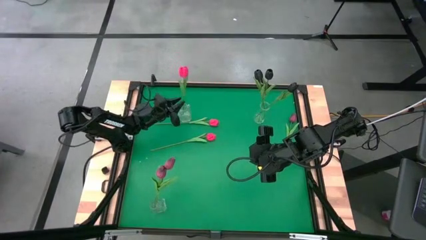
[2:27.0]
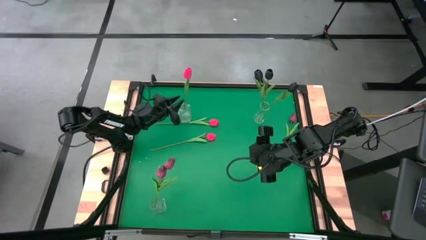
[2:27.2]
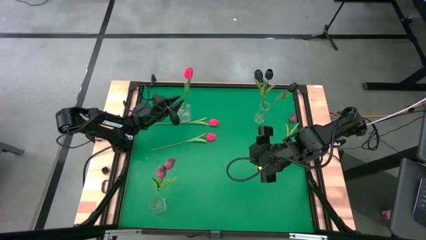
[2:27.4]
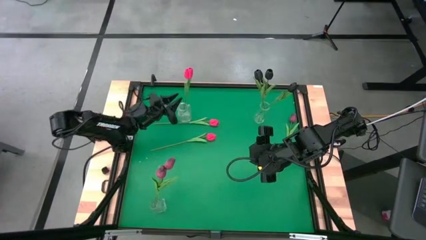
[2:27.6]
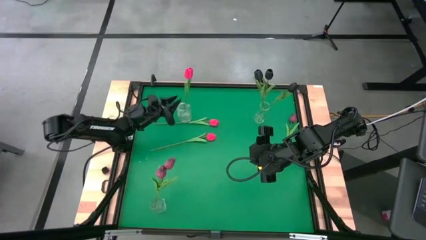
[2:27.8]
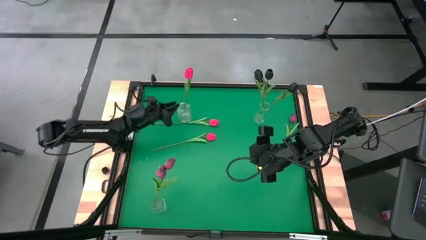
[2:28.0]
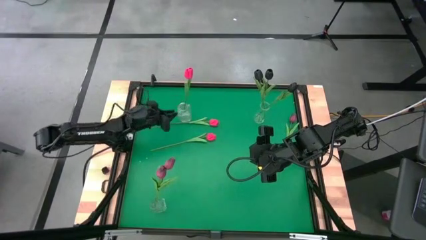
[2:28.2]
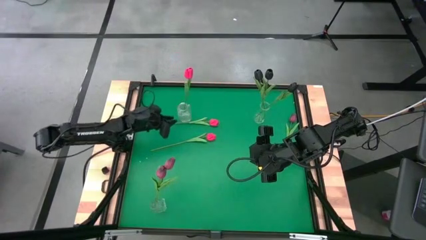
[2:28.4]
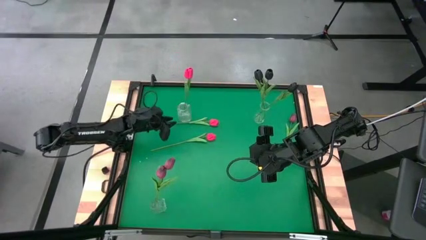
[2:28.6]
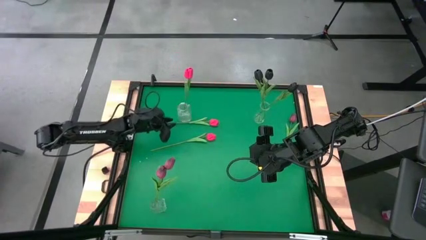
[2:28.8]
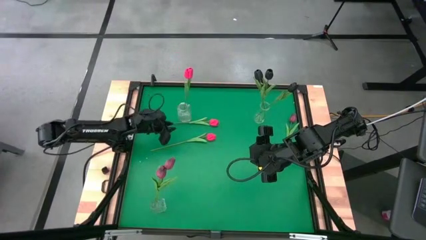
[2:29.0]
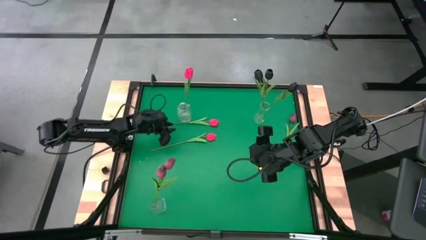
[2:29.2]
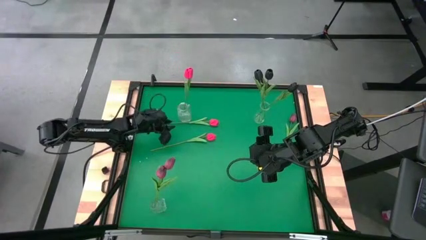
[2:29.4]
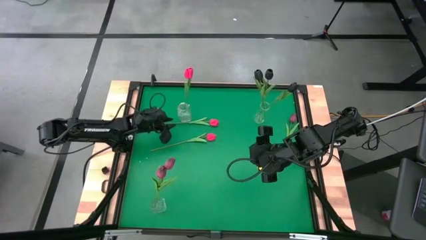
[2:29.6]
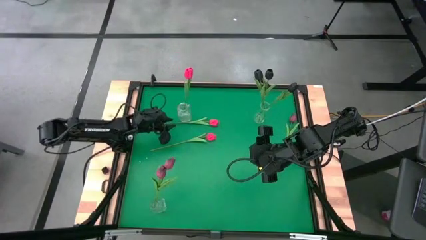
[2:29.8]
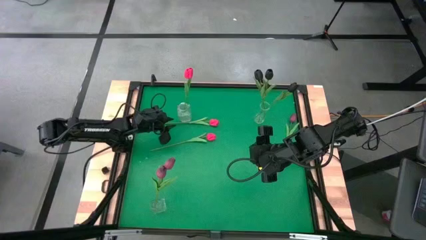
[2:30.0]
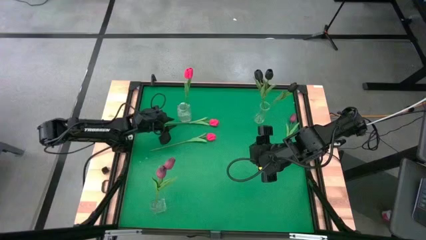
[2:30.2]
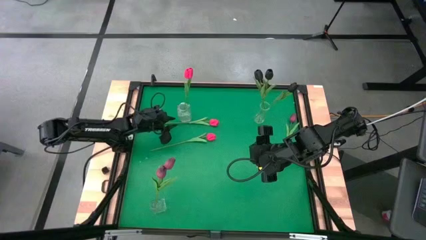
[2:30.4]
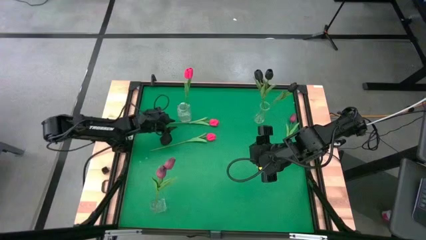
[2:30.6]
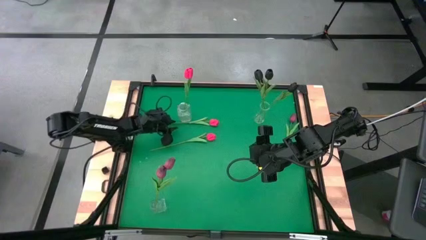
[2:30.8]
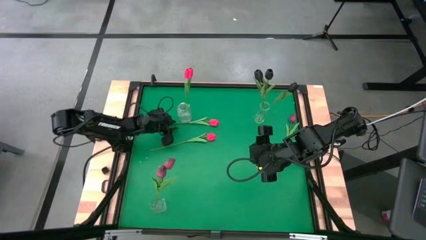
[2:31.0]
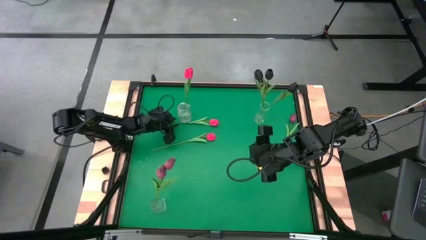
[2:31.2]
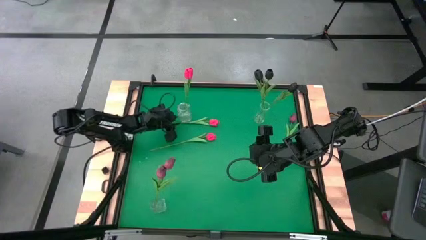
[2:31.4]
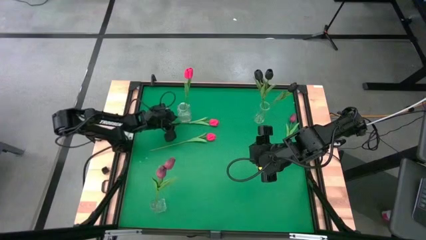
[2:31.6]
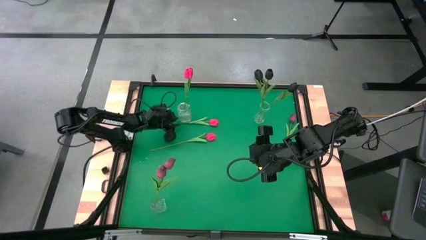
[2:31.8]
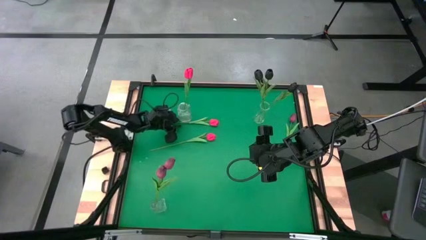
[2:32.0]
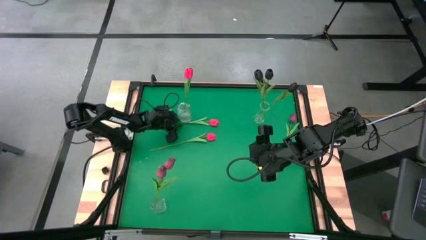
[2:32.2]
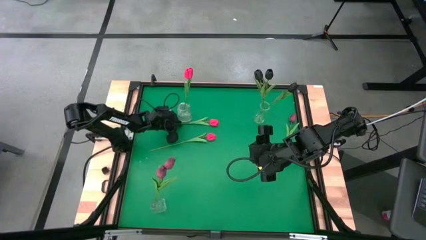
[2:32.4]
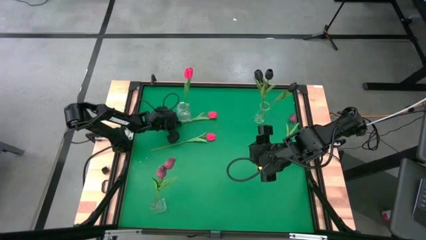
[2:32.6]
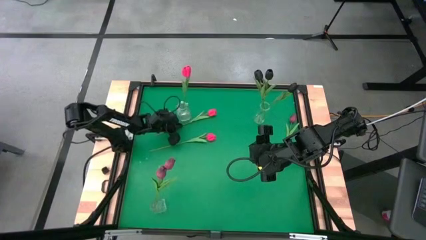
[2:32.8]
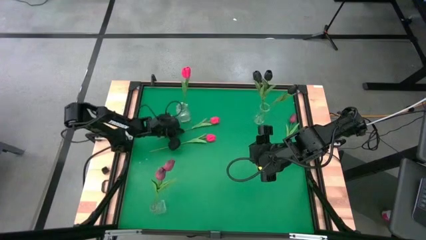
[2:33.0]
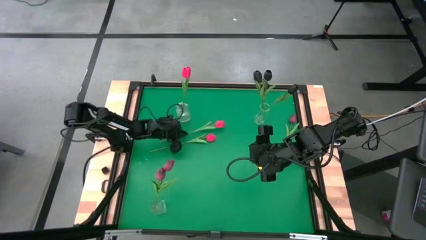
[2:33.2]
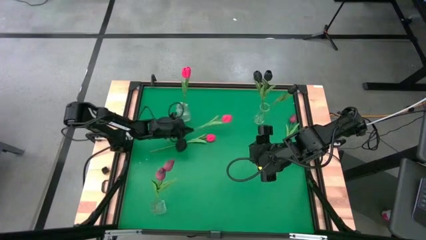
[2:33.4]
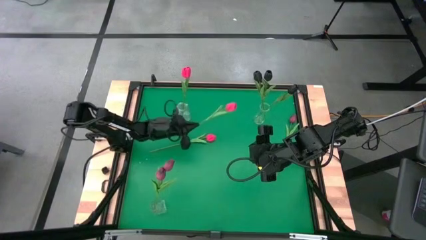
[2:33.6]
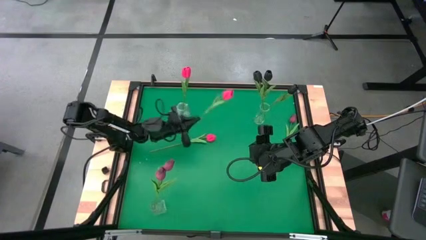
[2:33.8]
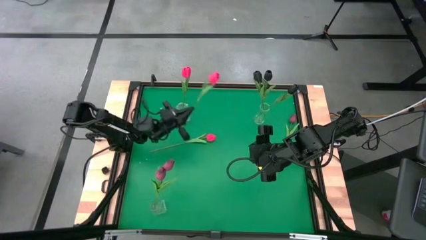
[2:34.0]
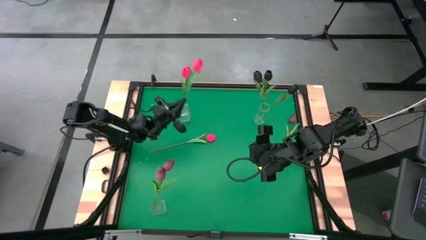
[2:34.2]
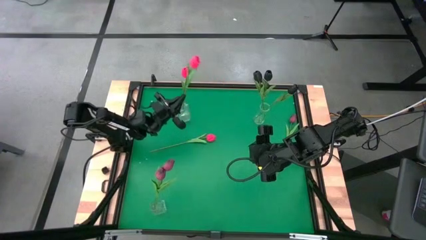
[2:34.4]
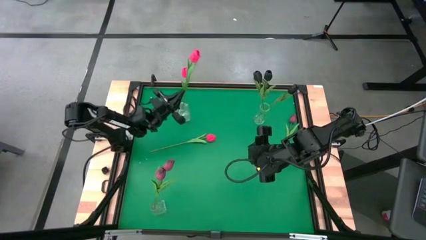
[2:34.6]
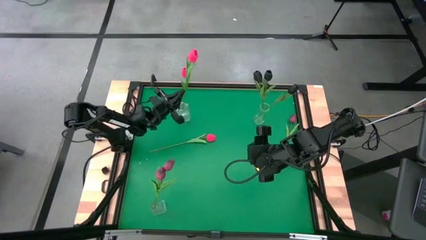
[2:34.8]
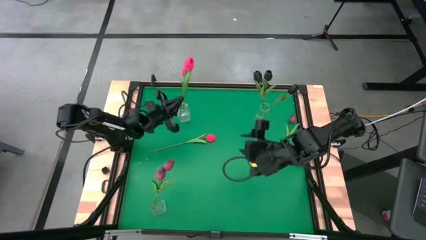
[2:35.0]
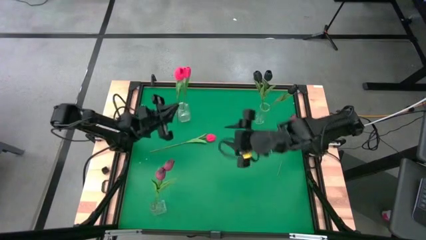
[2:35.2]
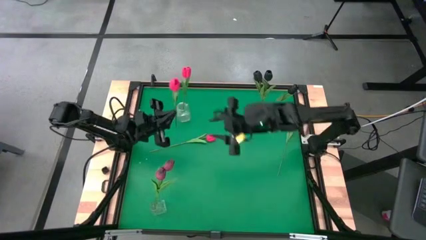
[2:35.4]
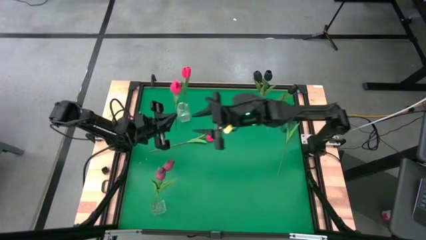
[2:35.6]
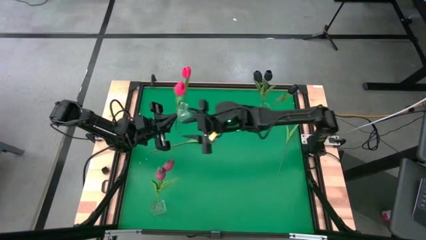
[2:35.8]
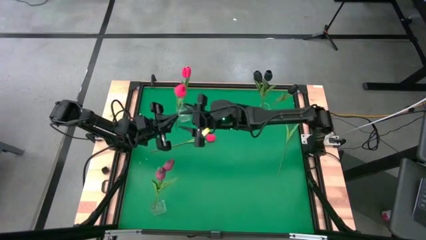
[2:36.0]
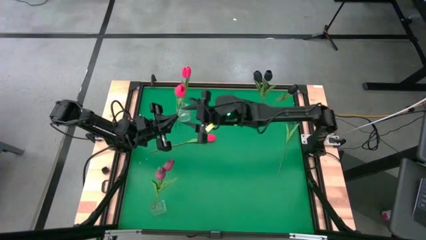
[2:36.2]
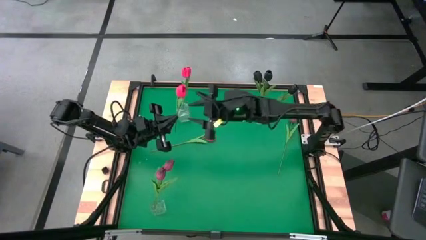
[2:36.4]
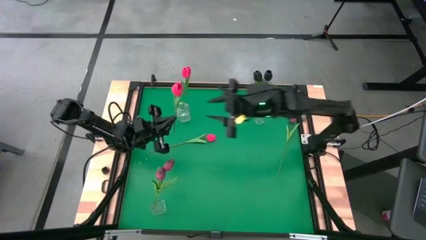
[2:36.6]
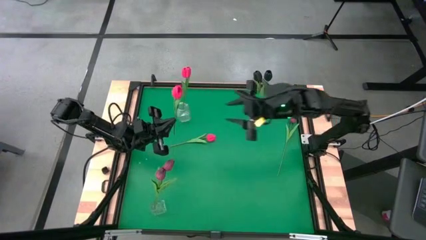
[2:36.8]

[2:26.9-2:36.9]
Task: Sort flowers into vase by color
Put the top pink flower into the top left transparent vase
